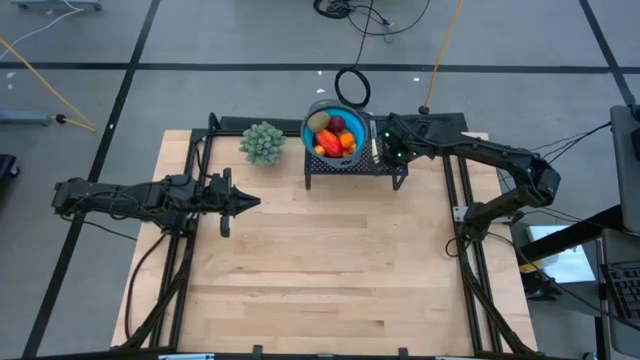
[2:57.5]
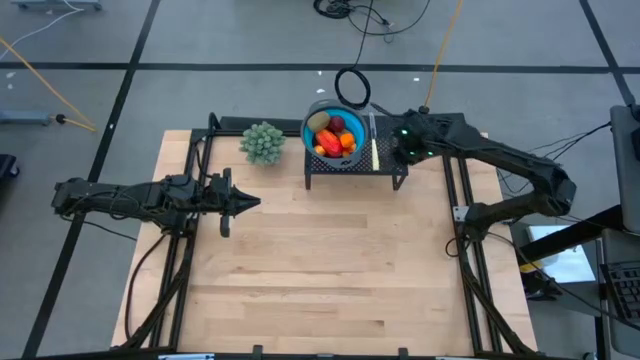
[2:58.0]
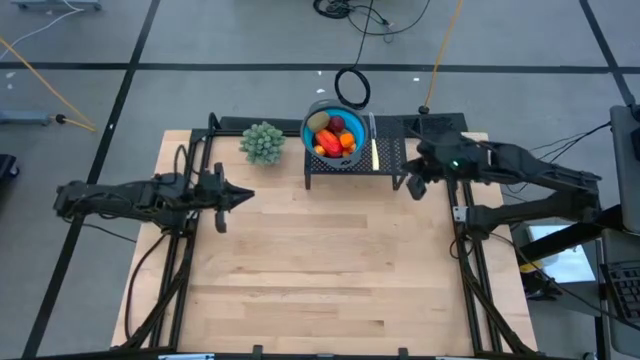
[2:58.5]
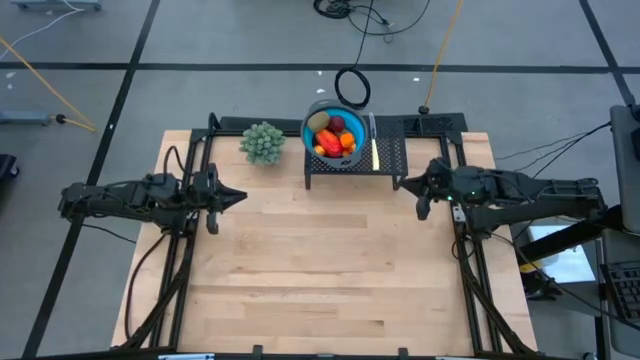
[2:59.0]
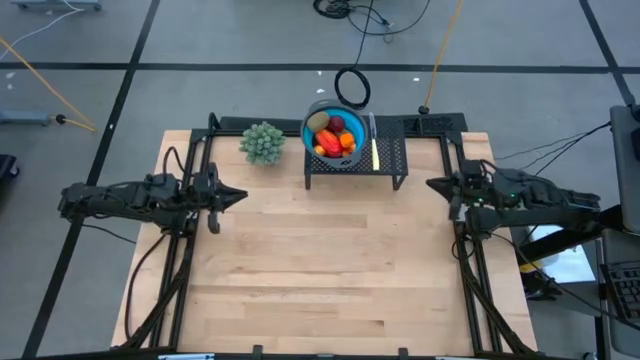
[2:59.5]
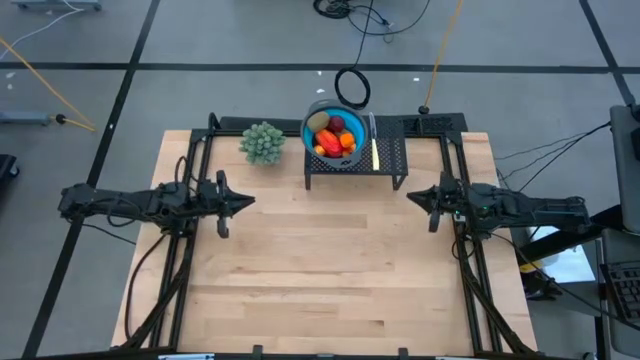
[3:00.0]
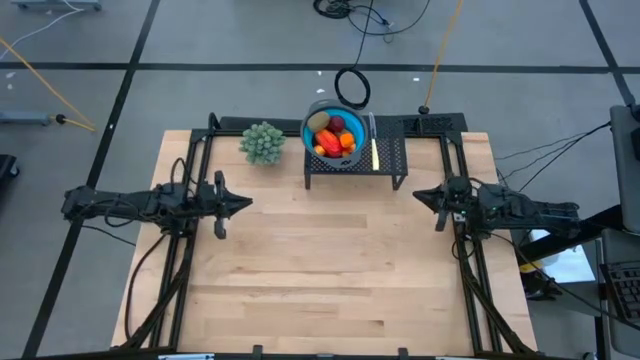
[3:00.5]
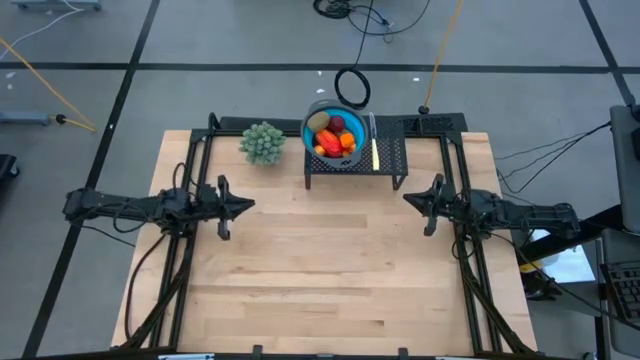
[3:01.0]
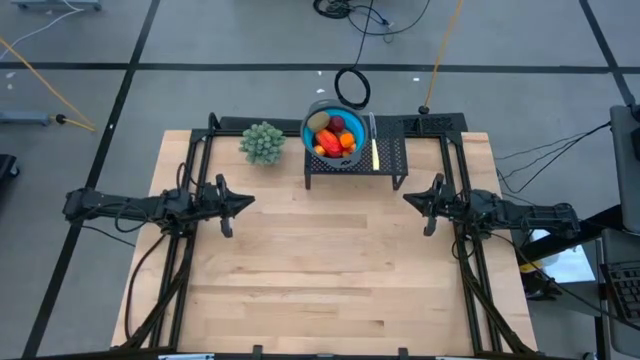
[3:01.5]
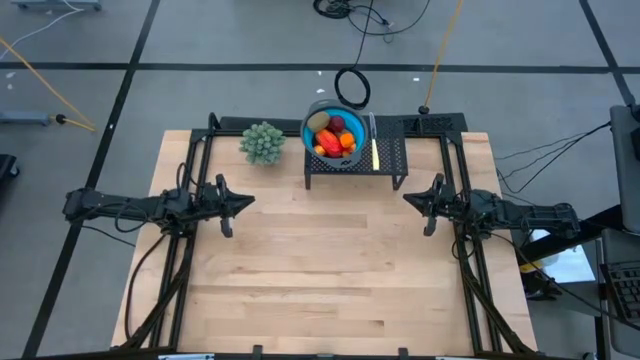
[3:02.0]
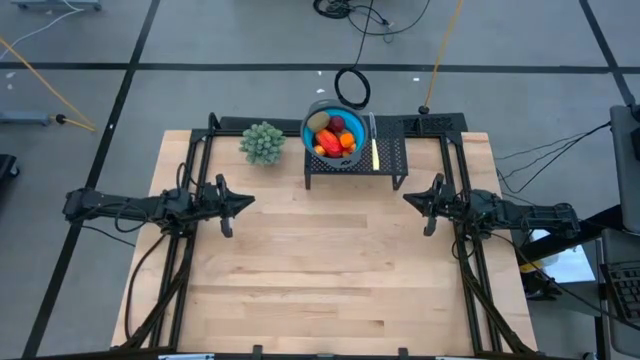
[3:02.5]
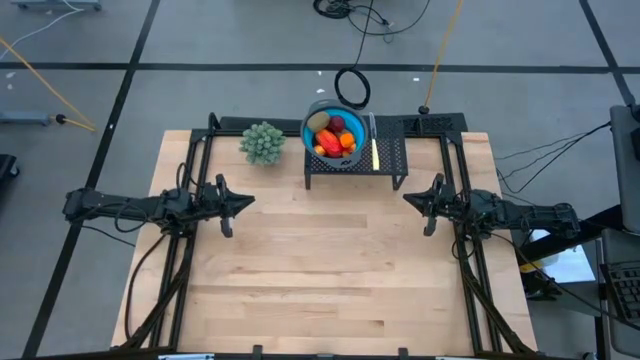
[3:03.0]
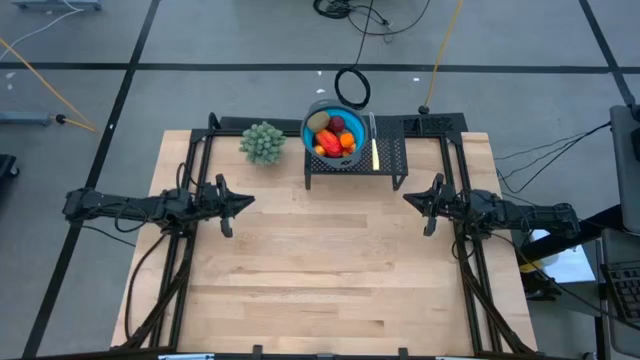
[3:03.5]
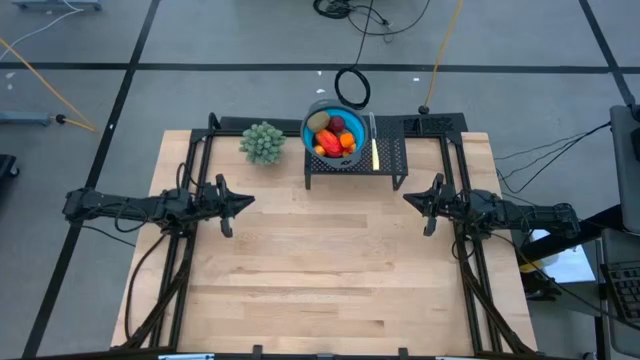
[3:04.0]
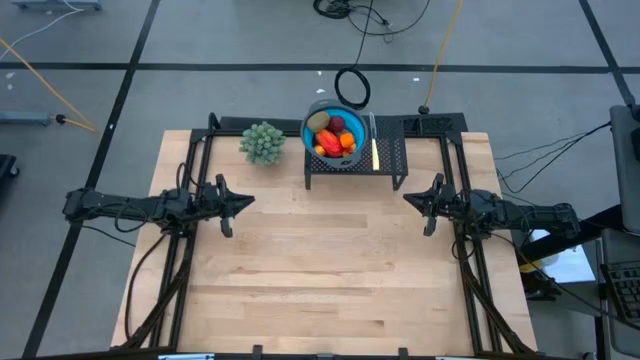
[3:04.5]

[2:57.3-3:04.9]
Task: Pick & Place Fruit
Return to Home Position

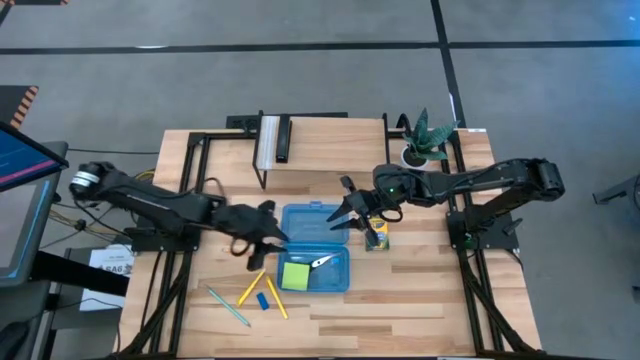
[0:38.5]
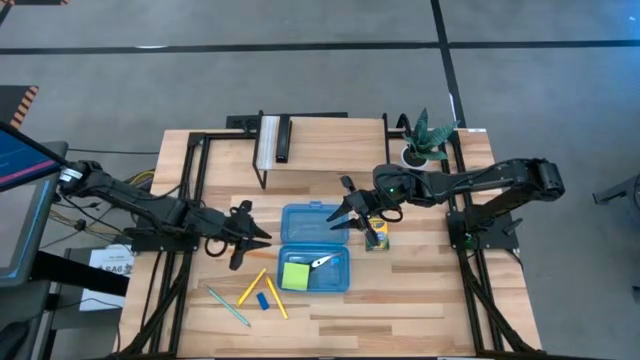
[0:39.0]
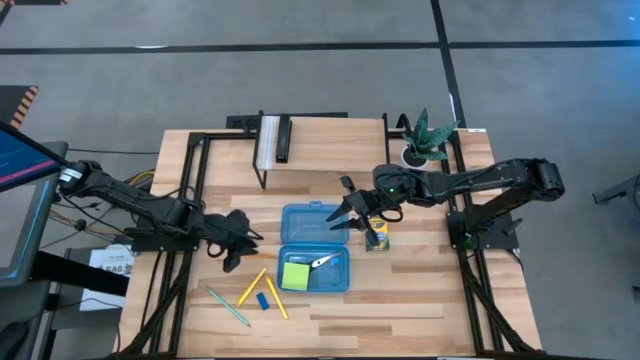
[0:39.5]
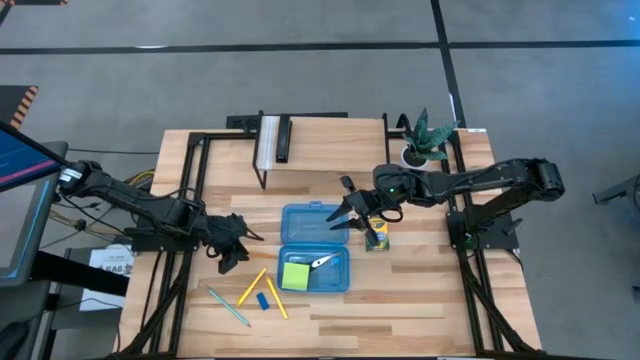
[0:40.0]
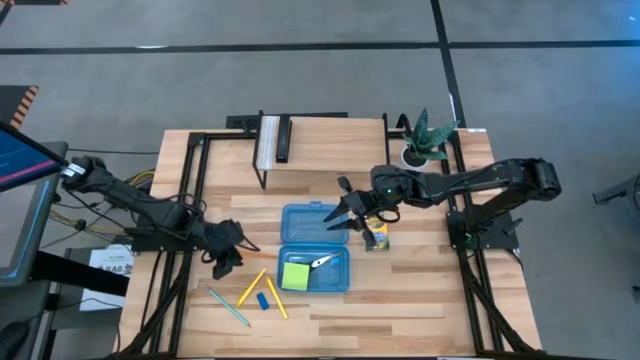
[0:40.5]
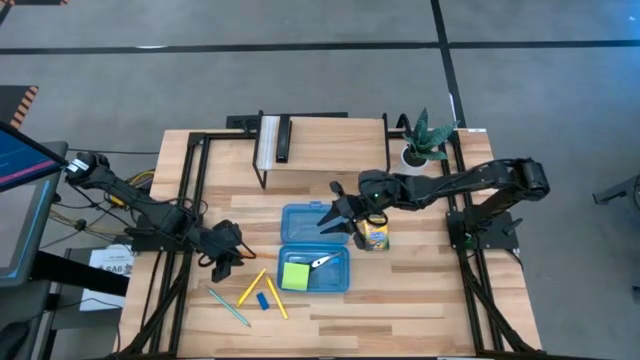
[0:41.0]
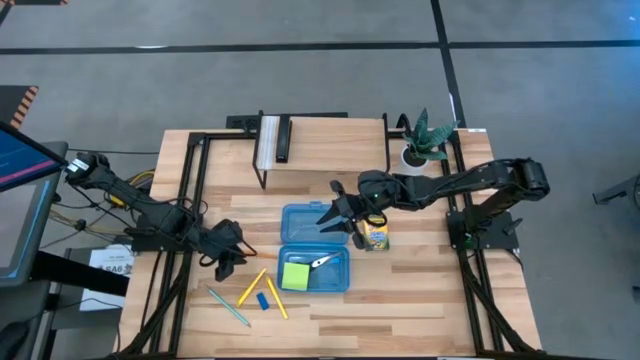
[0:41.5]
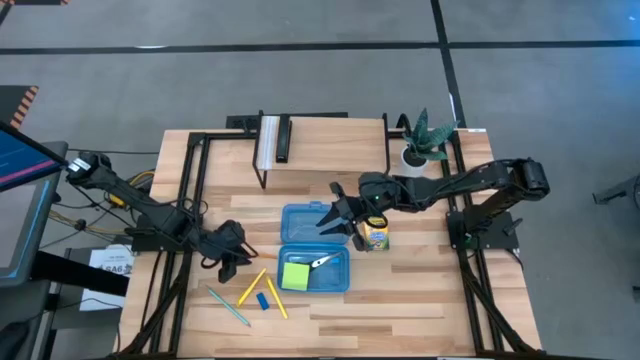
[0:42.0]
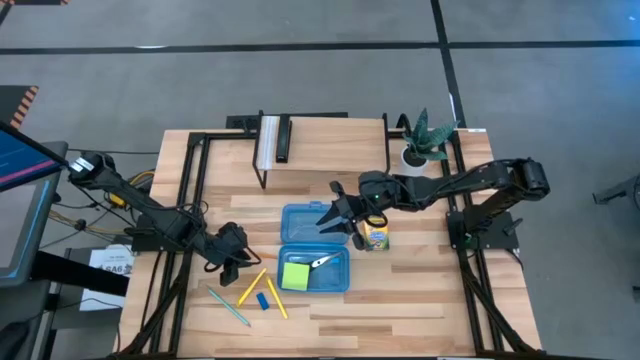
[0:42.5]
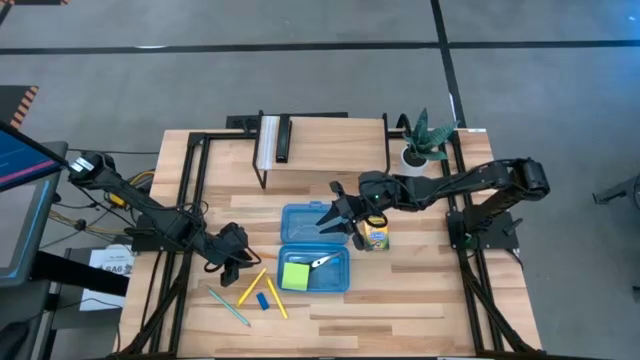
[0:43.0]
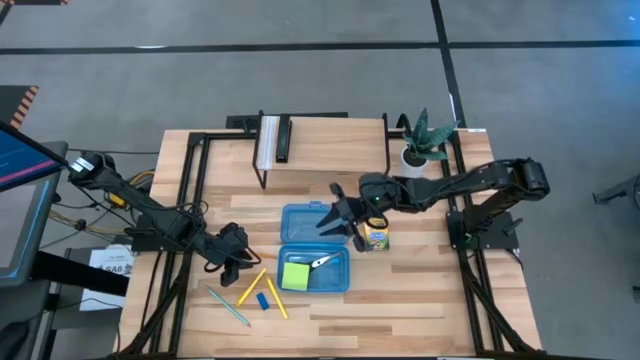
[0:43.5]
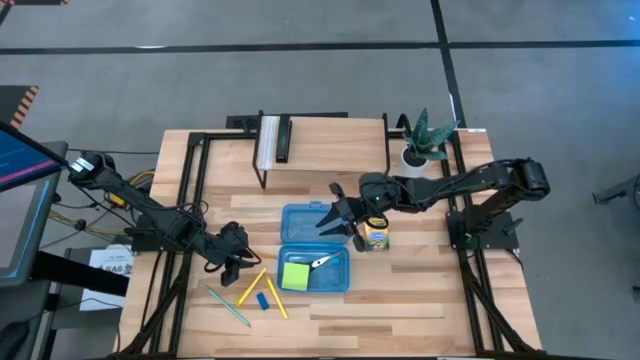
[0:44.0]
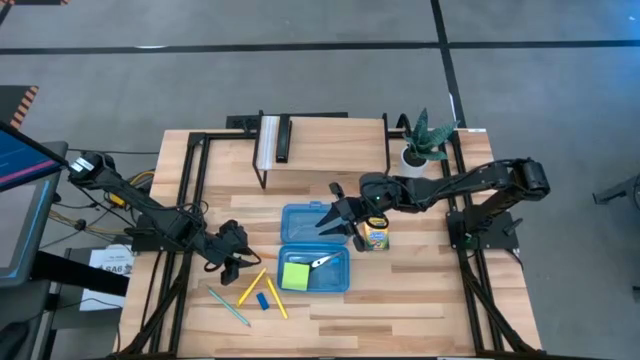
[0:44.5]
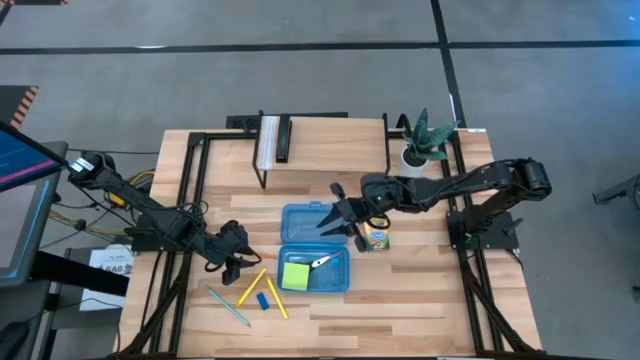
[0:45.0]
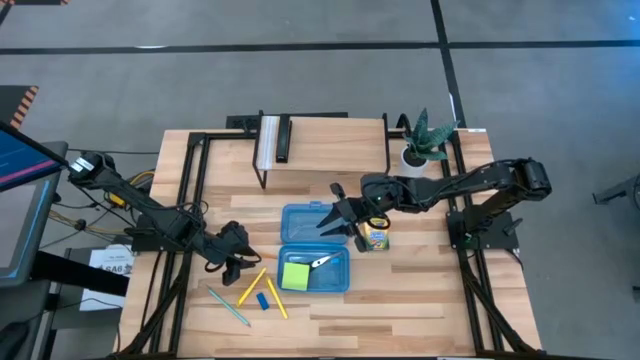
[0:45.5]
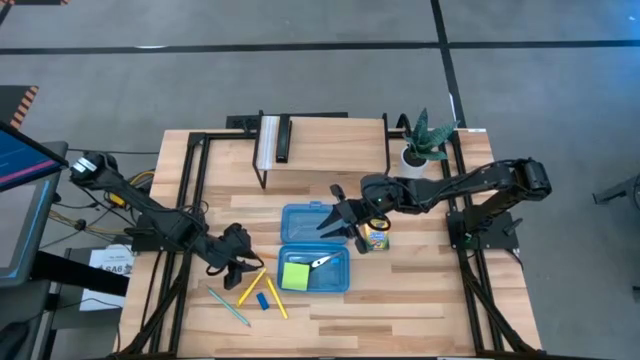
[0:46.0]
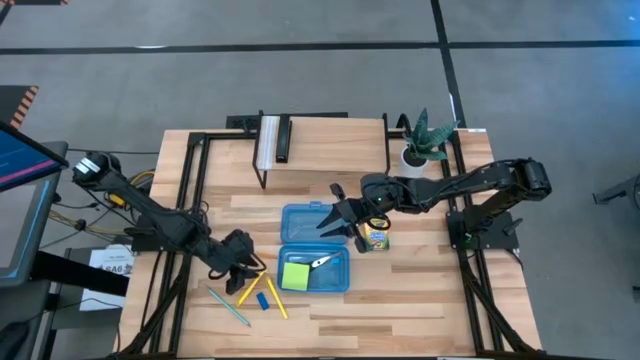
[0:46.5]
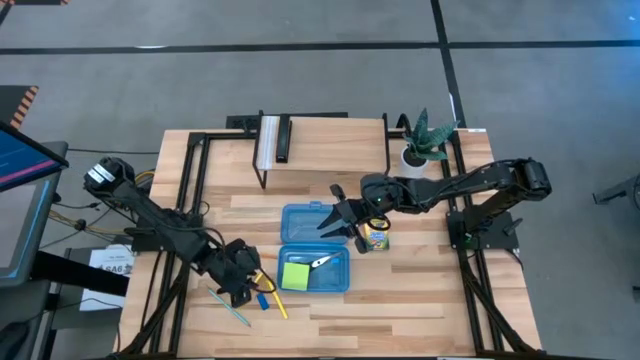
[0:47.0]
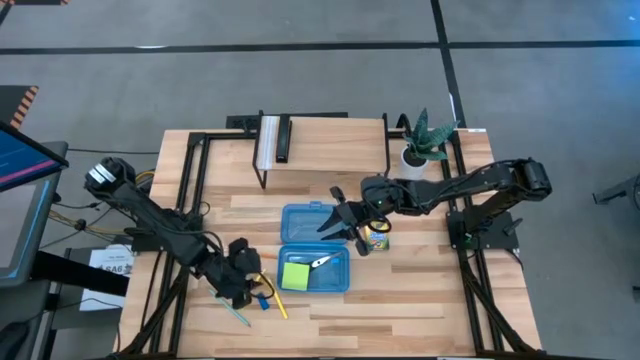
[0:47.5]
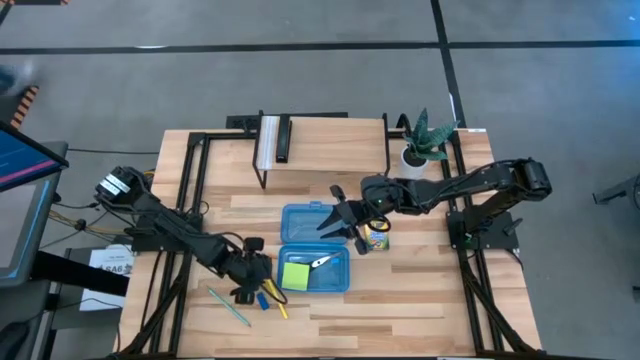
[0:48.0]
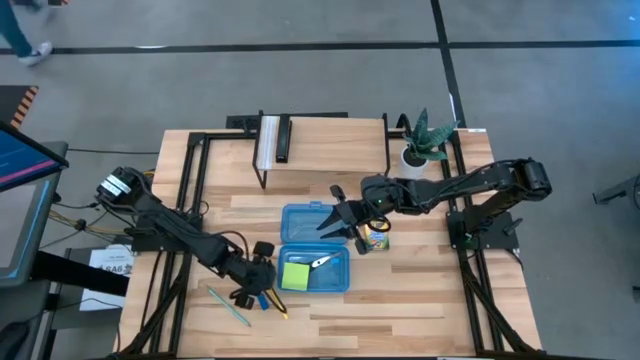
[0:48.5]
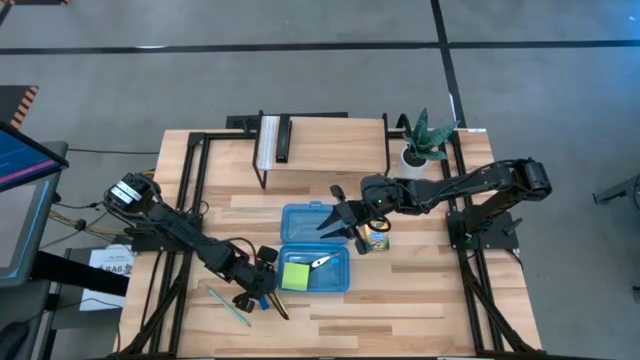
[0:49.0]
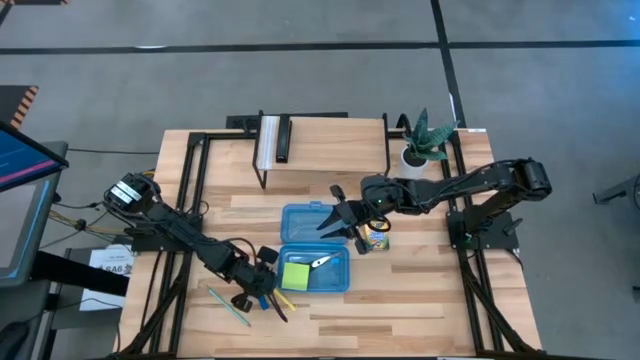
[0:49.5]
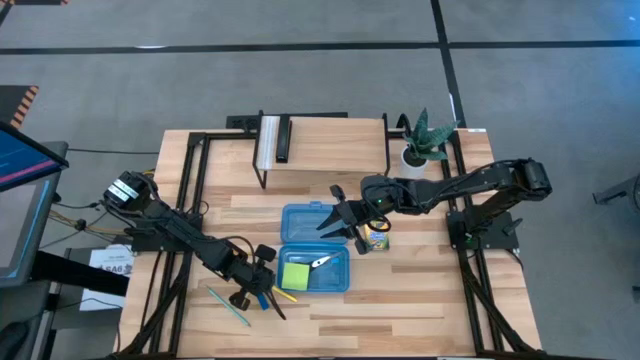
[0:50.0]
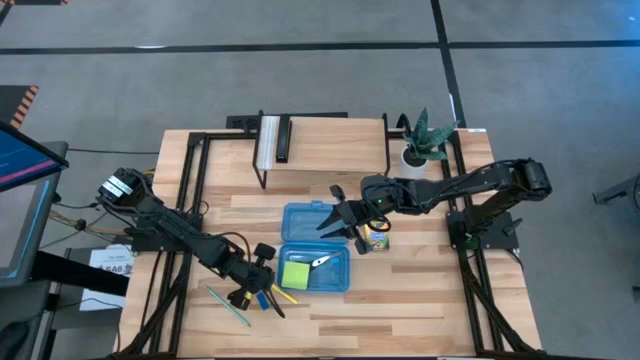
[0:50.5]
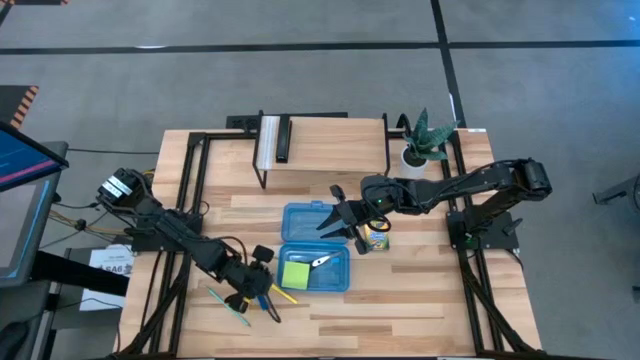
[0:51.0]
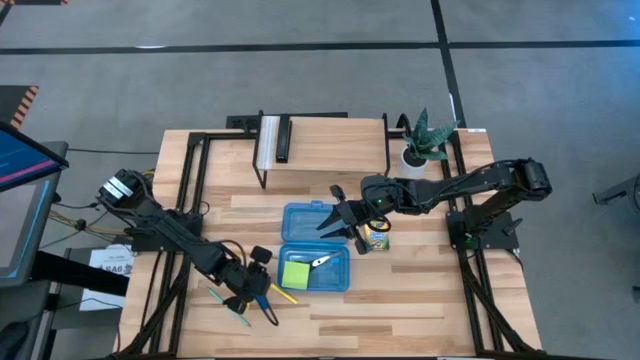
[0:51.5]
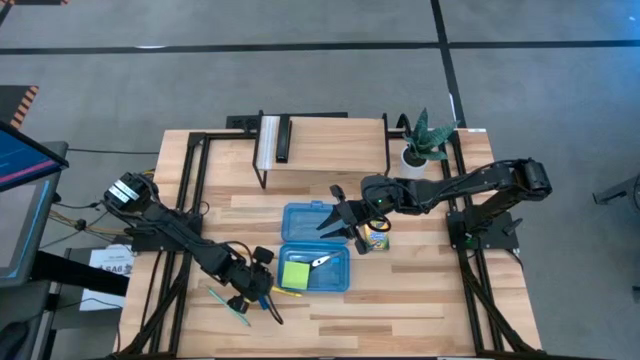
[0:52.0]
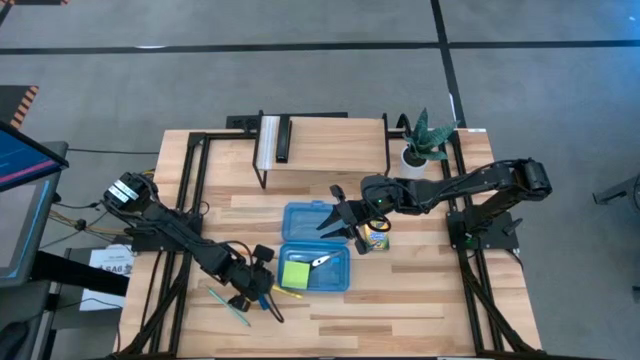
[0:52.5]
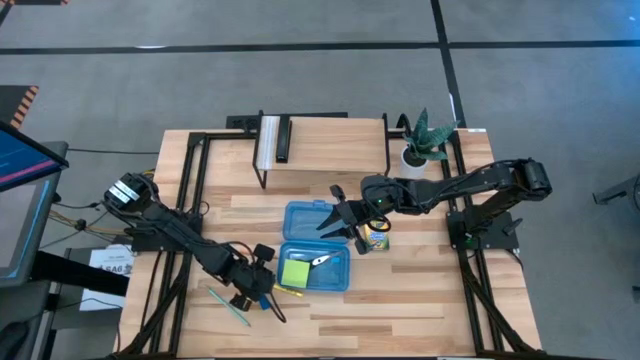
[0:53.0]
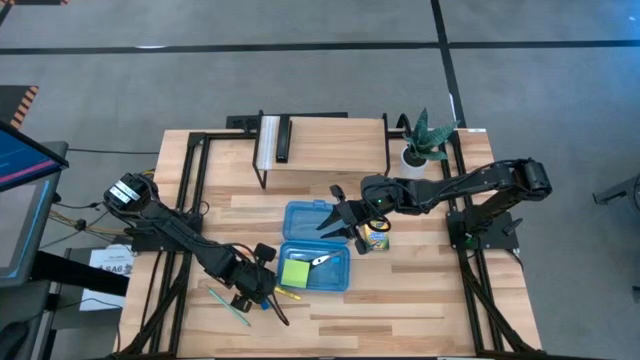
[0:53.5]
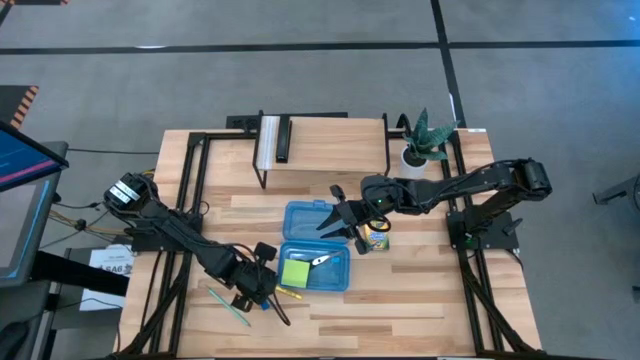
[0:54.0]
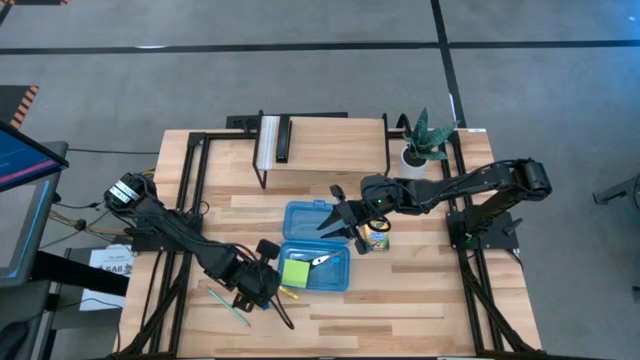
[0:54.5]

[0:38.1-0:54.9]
Task: Pack school essentials
Put the right yellow pen into the blue supply box
